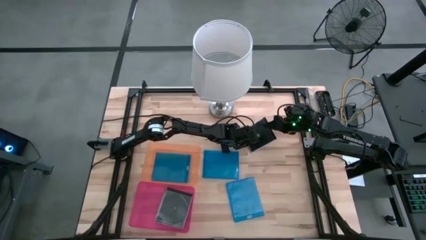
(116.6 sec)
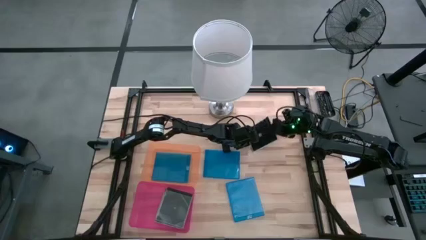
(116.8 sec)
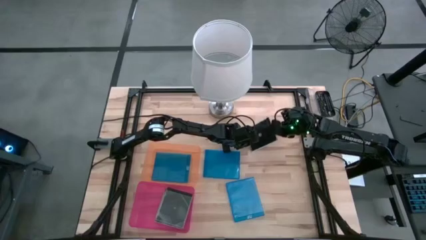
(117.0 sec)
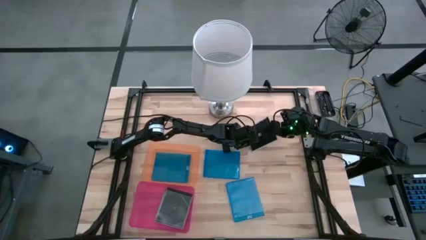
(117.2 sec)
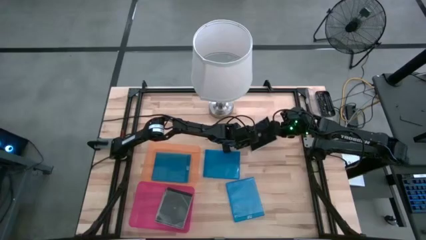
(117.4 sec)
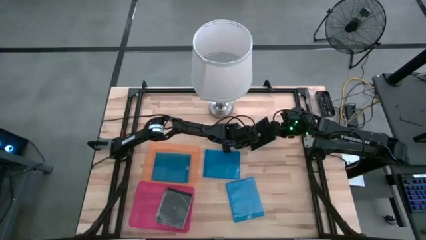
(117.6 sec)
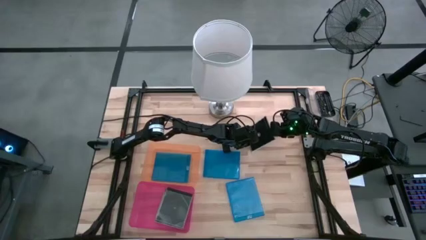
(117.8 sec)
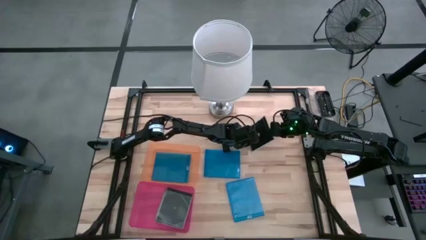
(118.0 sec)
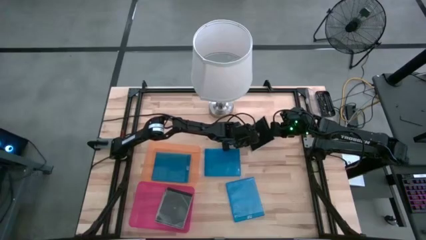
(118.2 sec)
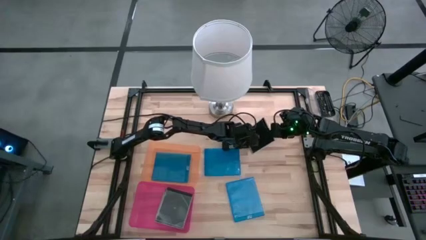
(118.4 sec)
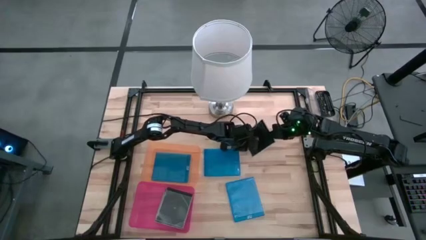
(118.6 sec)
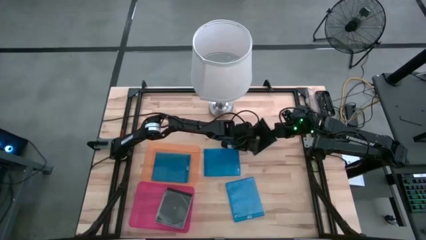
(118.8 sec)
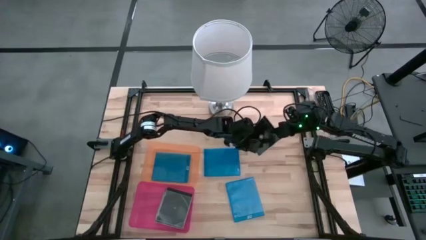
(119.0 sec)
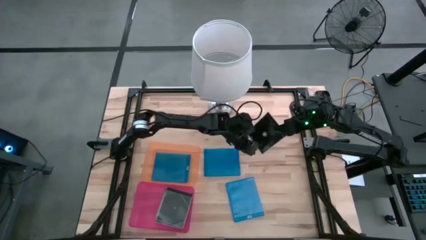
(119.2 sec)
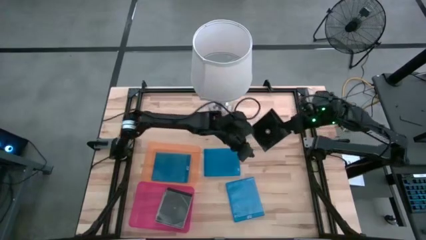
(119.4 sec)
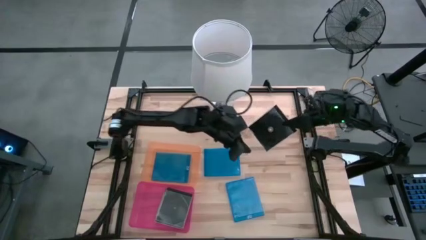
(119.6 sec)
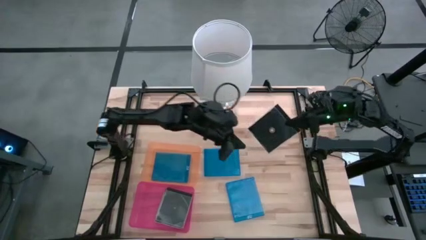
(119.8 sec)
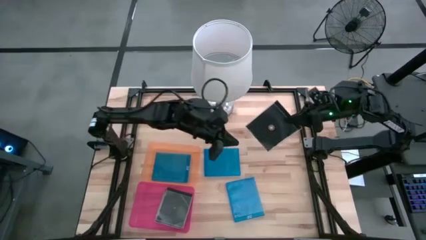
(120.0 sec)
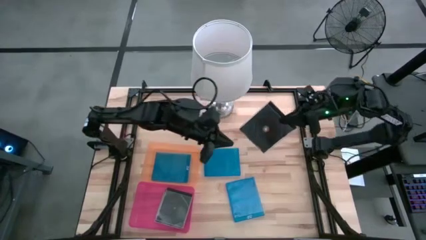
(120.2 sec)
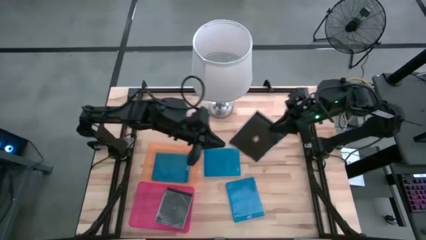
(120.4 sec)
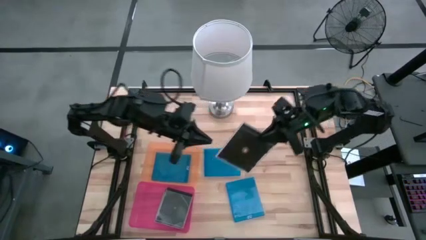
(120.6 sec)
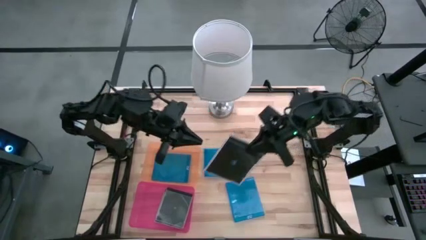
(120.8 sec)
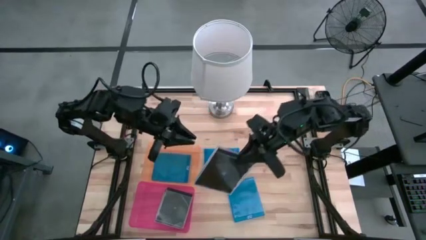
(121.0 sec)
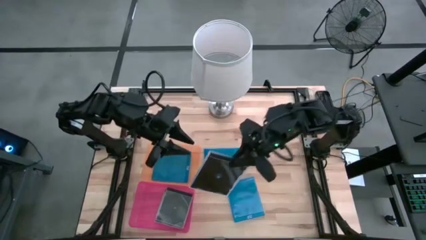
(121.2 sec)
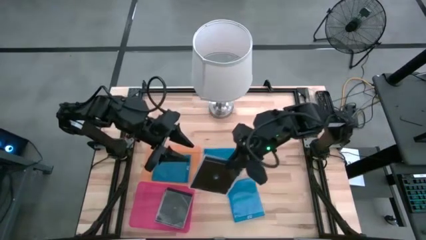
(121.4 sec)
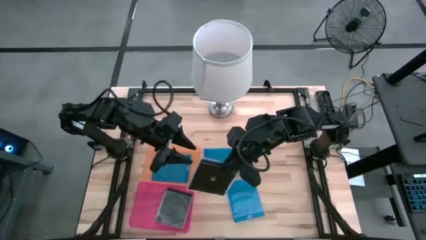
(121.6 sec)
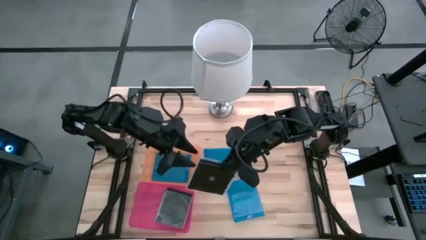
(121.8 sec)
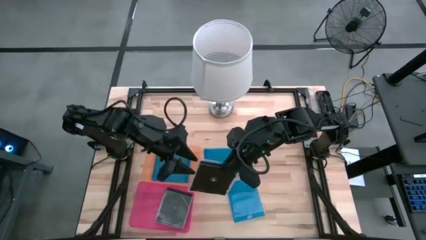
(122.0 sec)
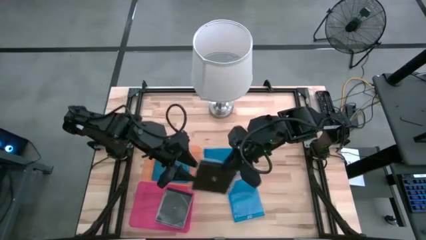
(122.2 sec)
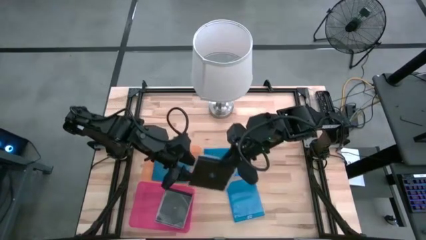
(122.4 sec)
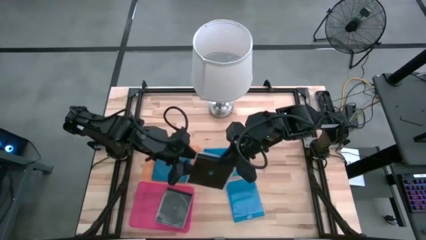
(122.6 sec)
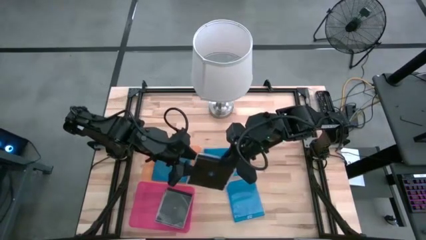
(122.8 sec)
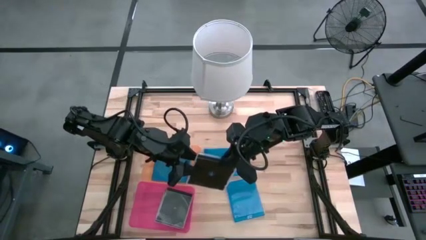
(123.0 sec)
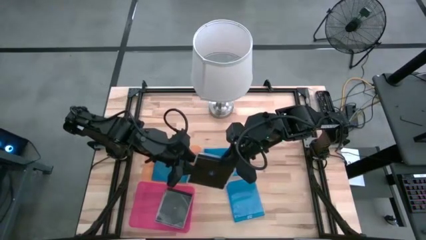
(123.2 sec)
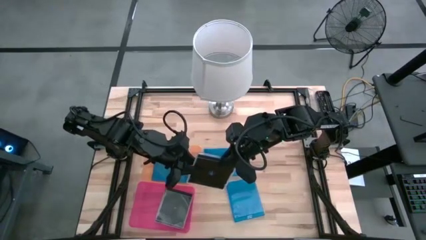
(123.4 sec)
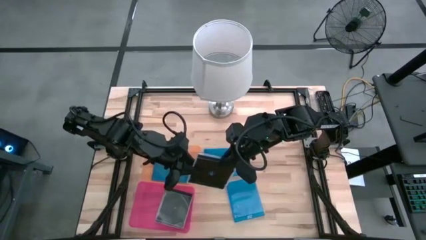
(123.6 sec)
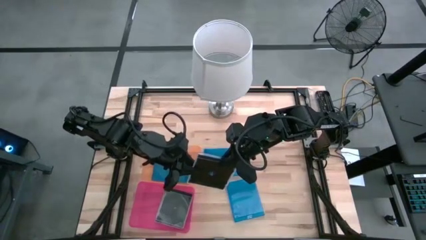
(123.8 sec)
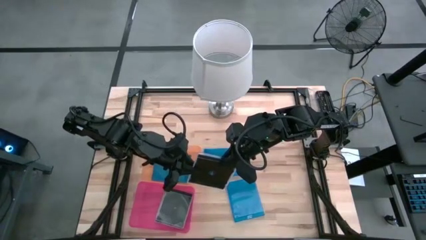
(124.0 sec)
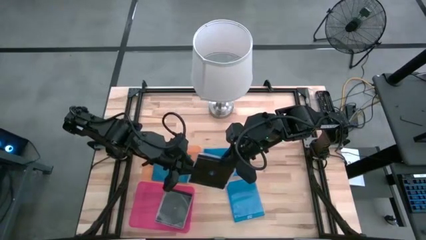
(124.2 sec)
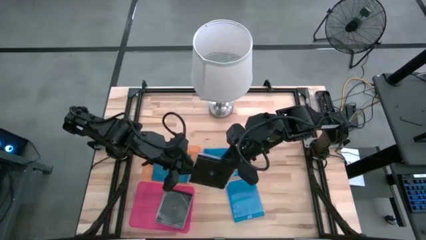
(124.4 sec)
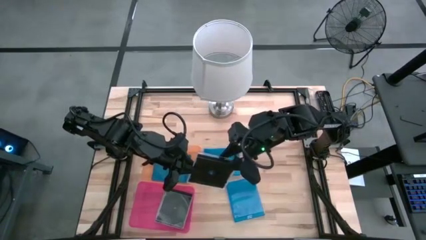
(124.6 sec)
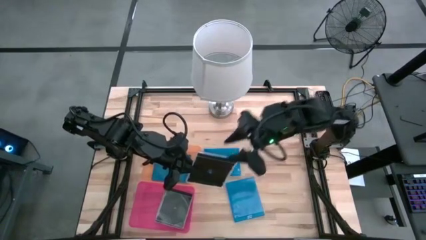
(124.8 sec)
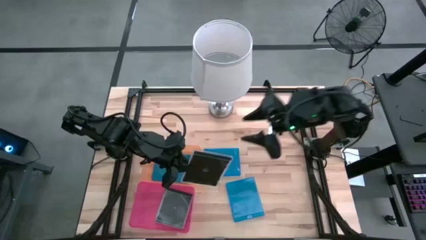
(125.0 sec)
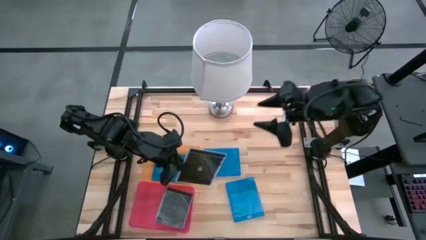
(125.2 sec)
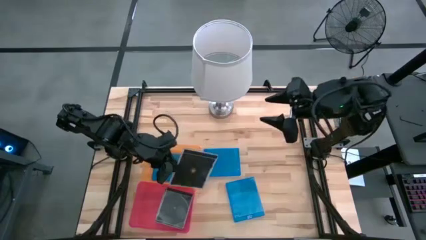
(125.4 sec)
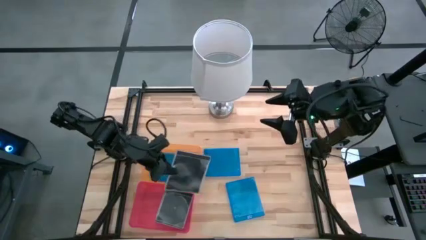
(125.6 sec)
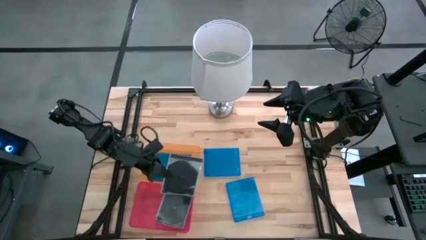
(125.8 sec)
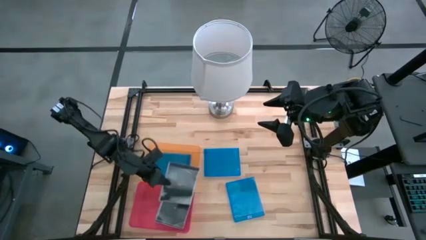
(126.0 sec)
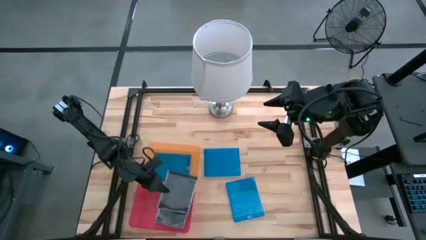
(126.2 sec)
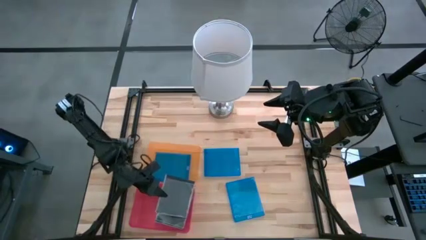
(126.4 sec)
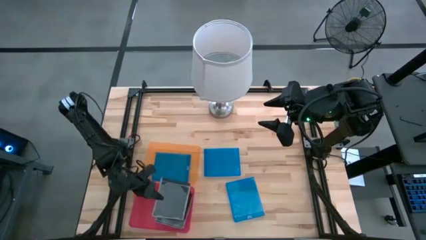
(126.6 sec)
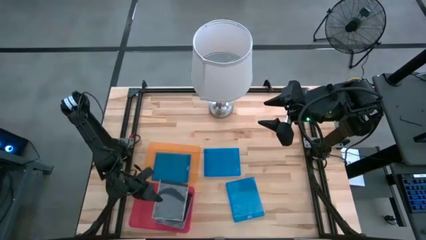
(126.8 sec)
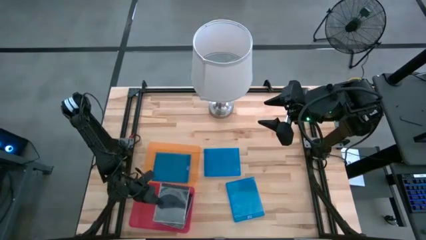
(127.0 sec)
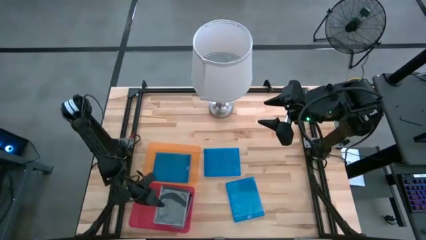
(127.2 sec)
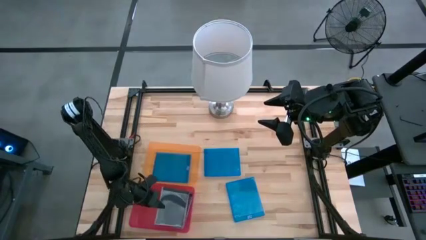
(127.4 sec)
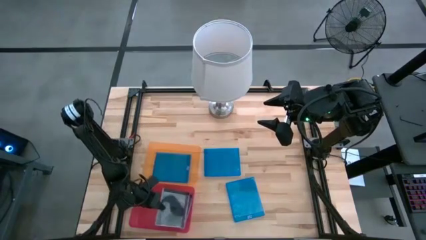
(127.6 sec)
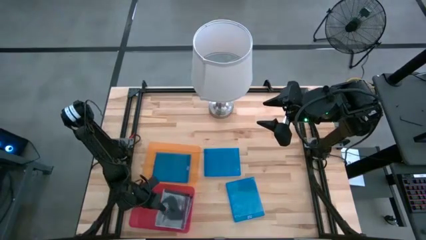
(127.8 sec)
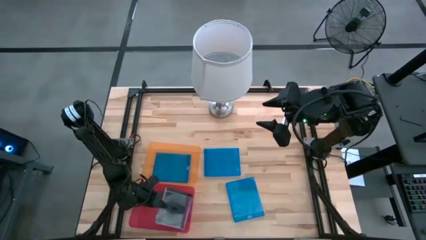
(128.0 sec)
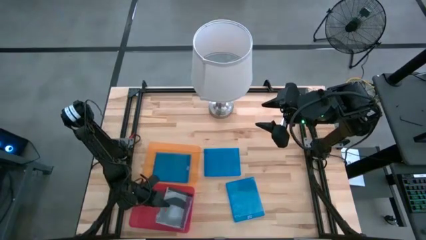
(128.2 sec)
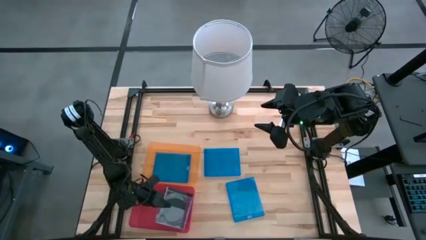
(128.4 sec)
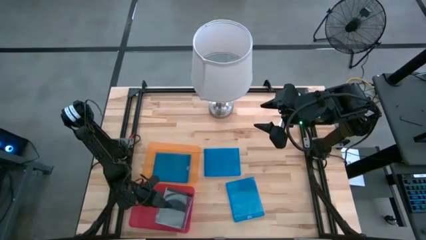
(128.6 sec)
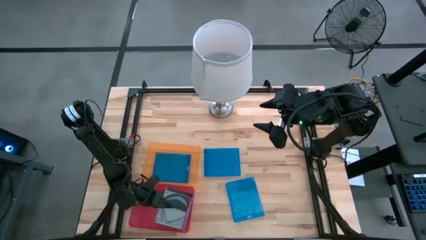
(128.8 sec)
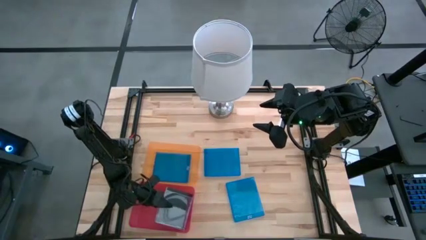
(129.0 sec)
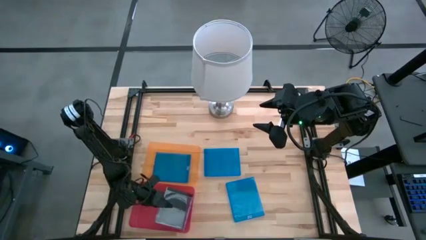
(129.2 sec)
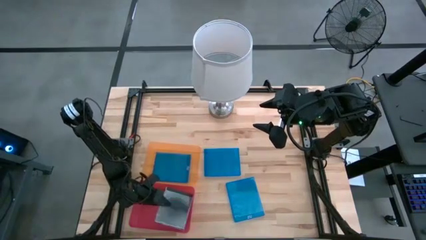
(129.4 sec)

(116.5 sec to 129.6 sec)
Task: Pick & place jewel cases by type
Put the black CD case into the pink bin
